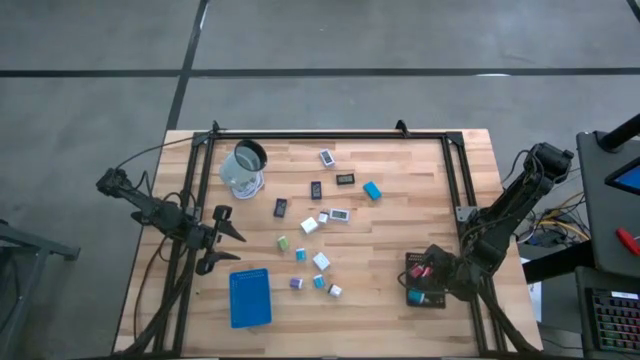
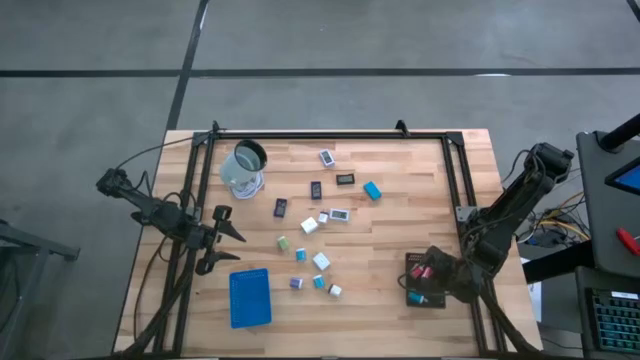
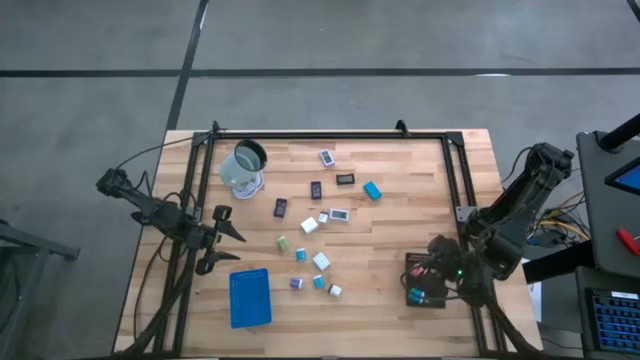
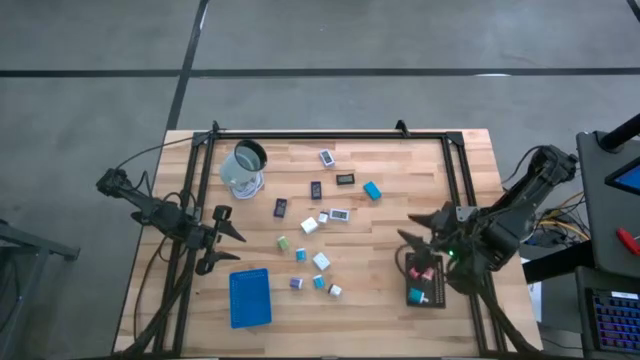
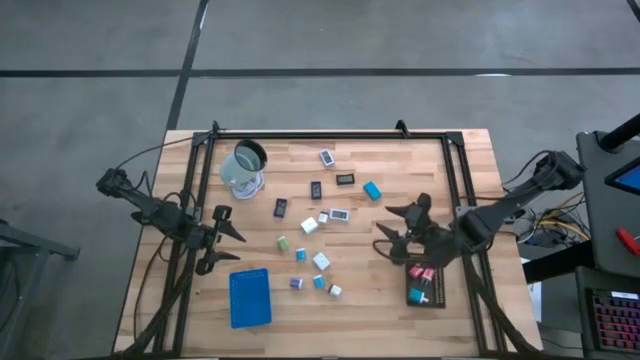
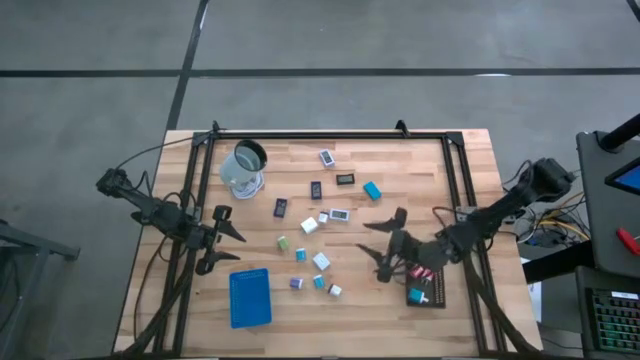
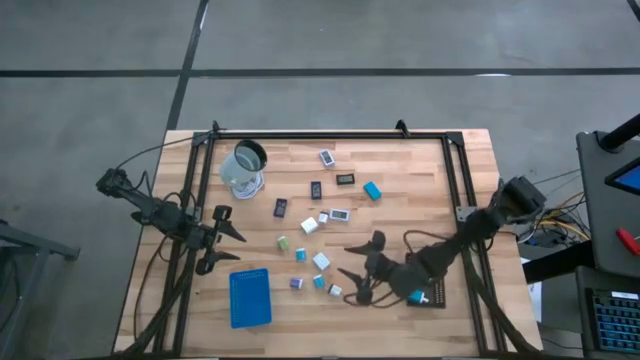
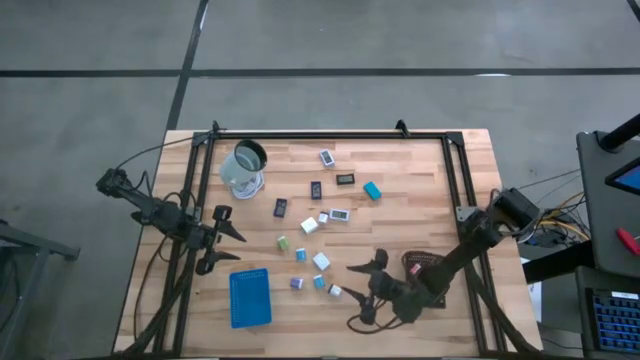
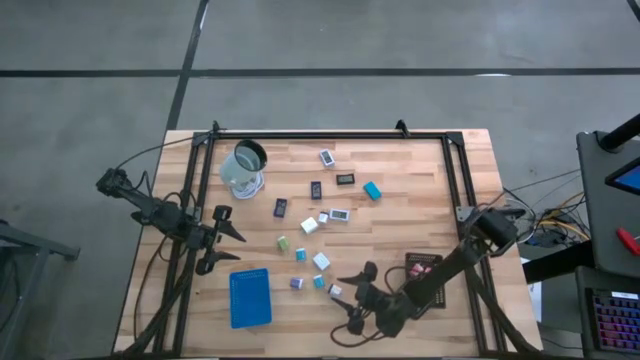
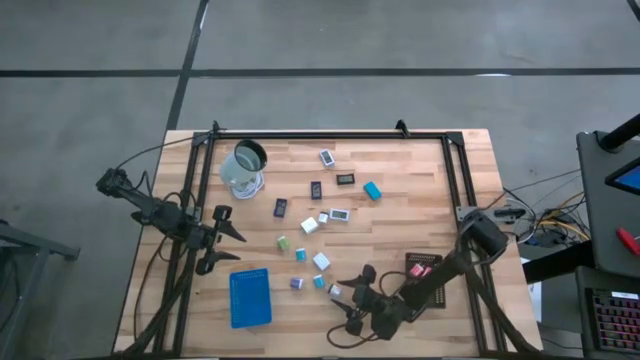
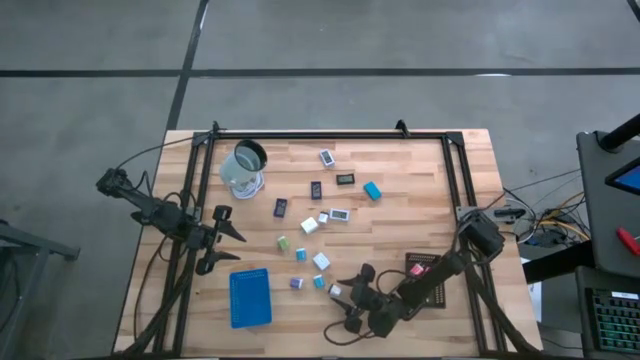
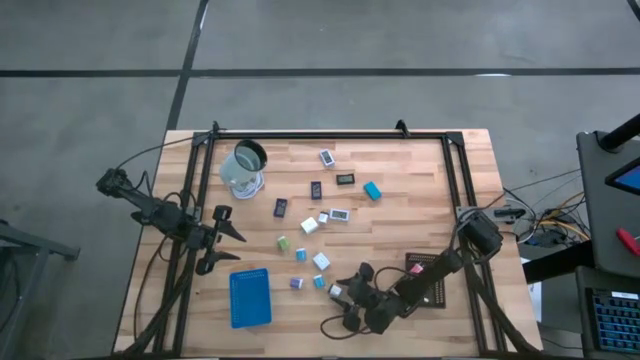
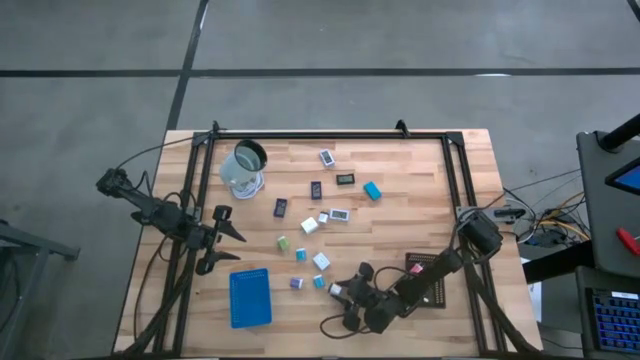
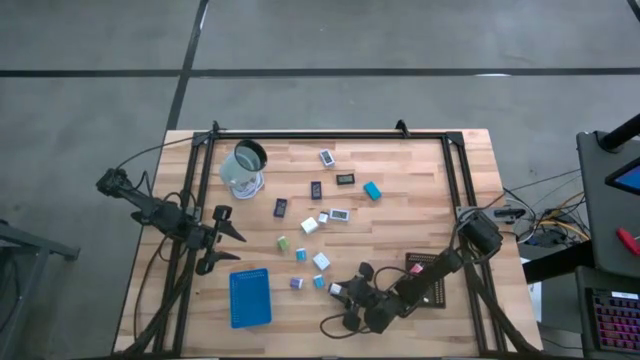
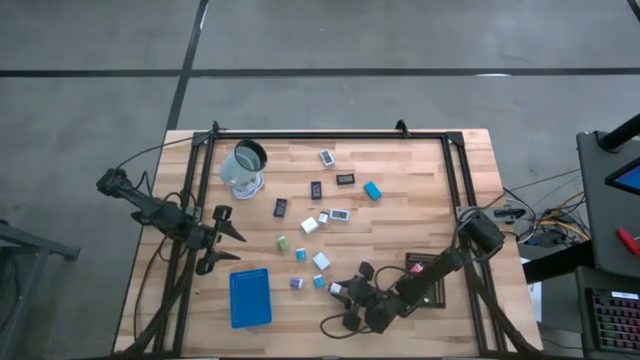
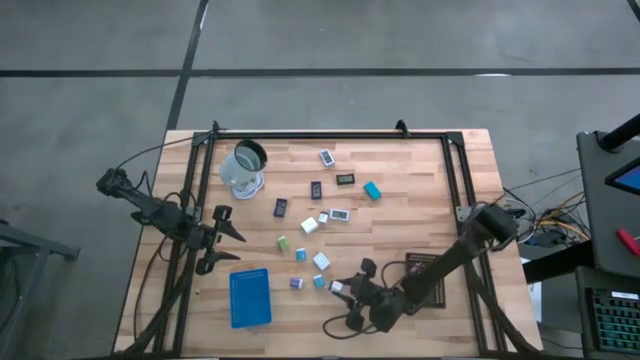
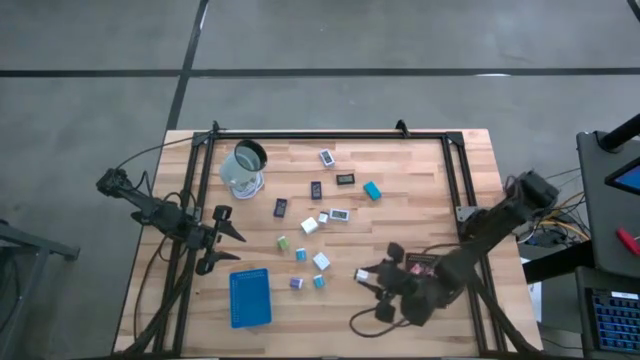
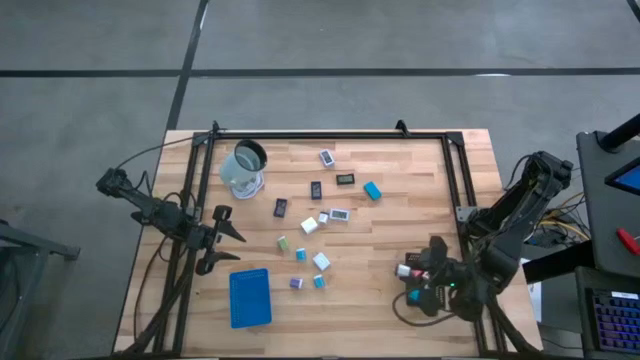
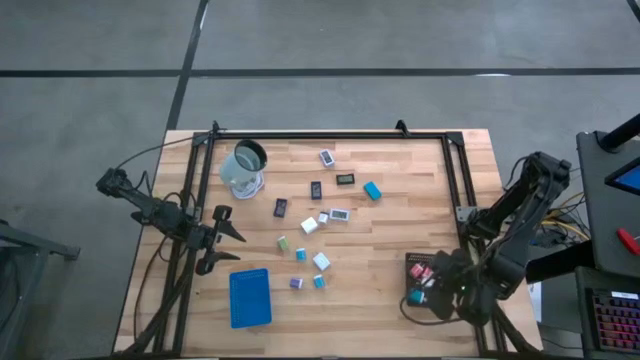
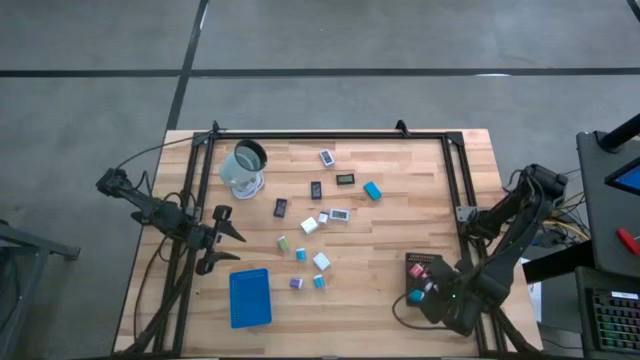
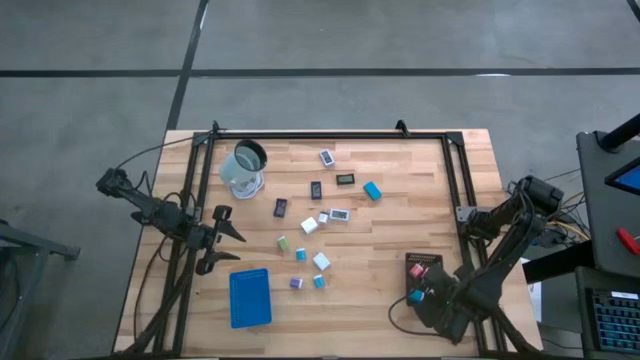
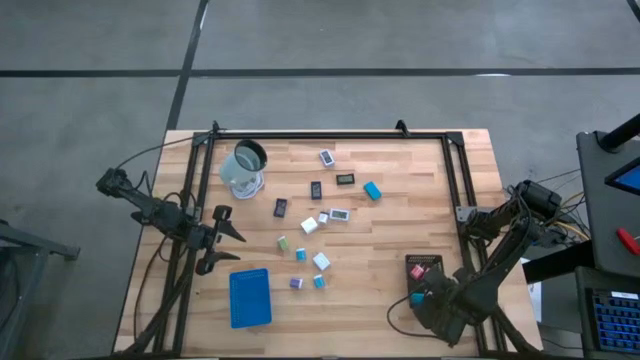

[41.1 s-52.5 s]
Task: Pick & Place Office items
Put the bottom white black charger adapter into the black bin

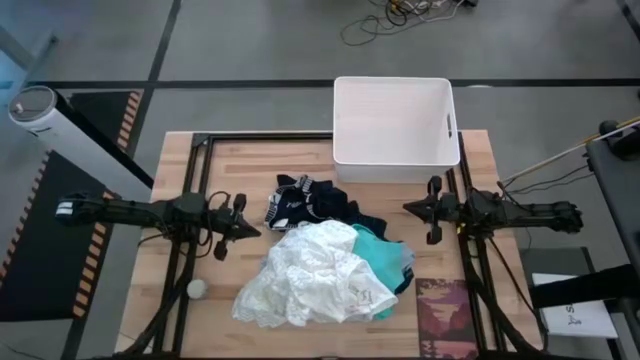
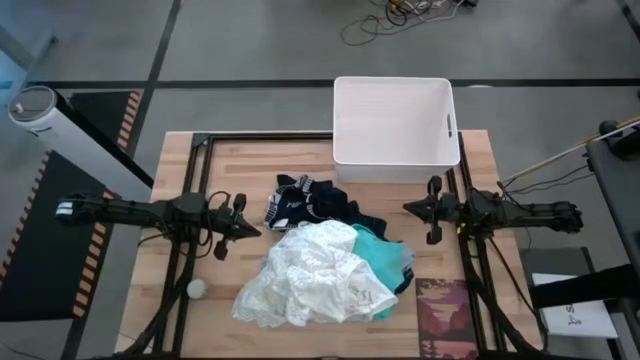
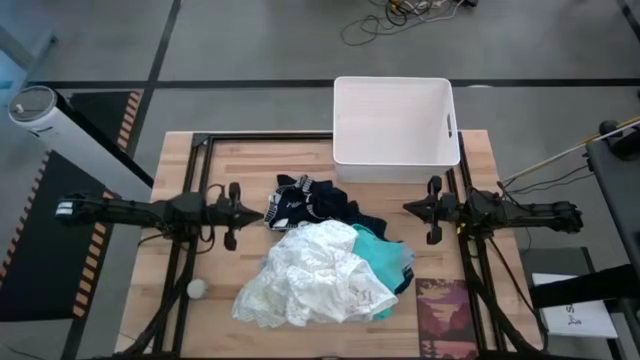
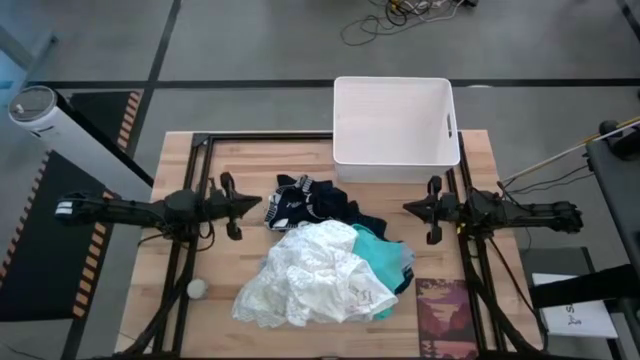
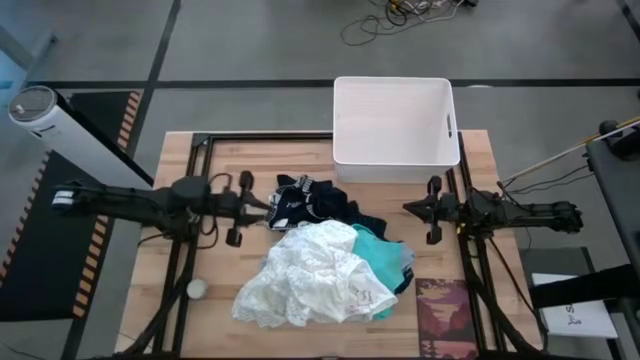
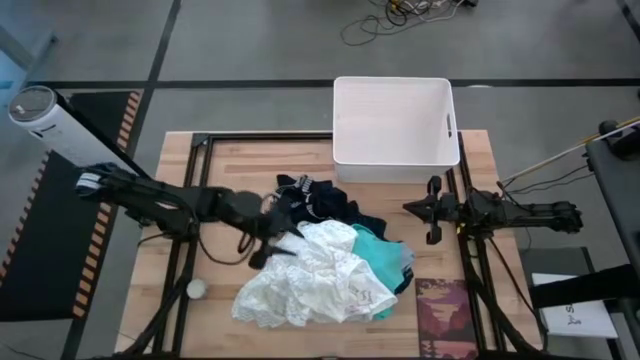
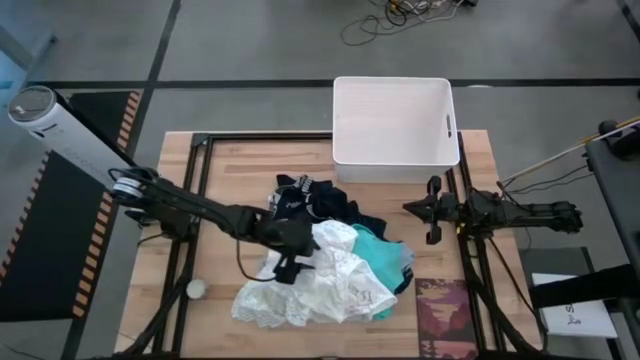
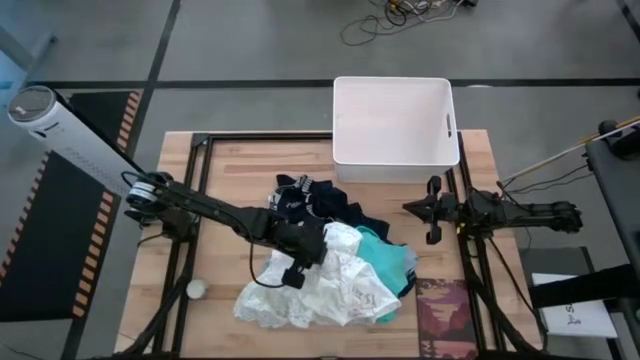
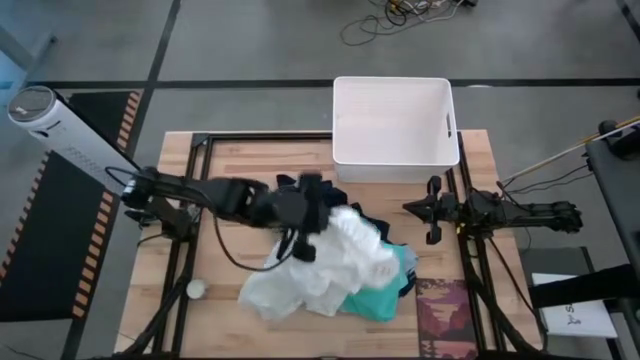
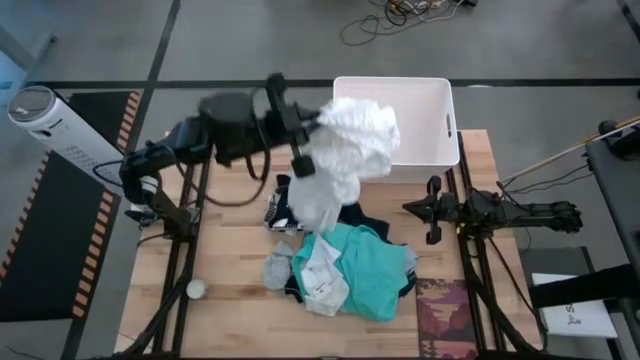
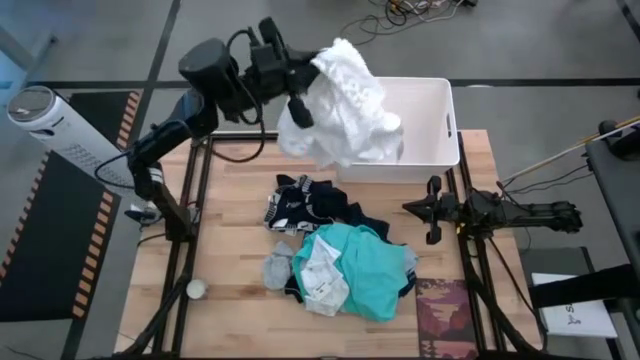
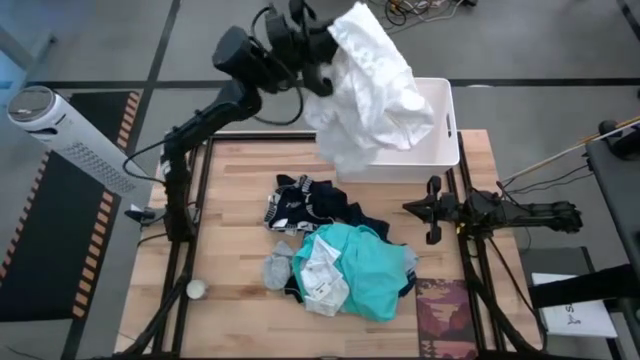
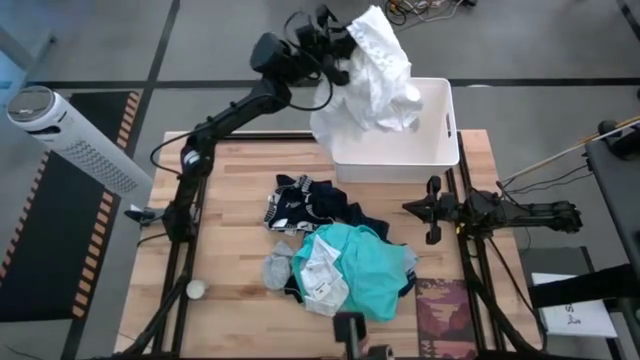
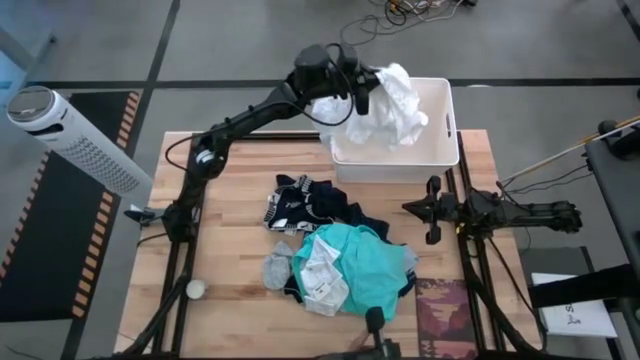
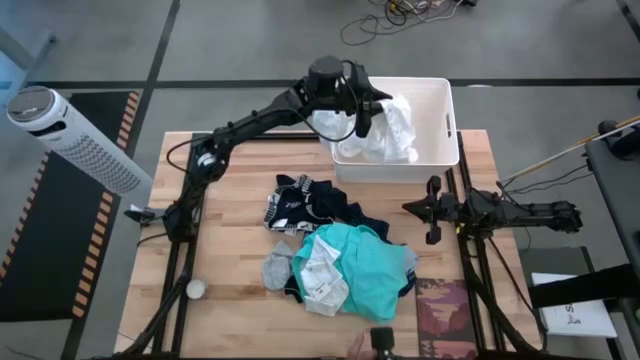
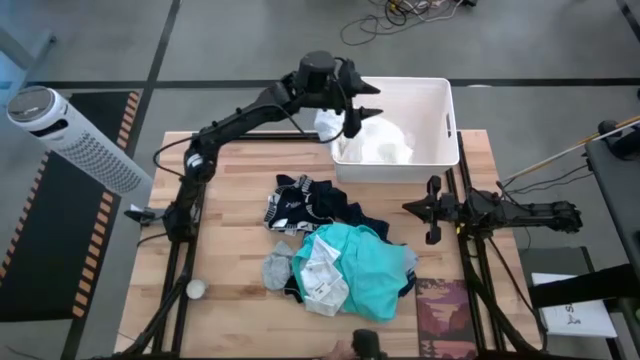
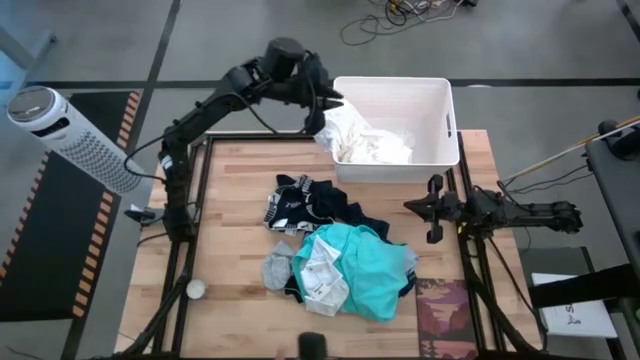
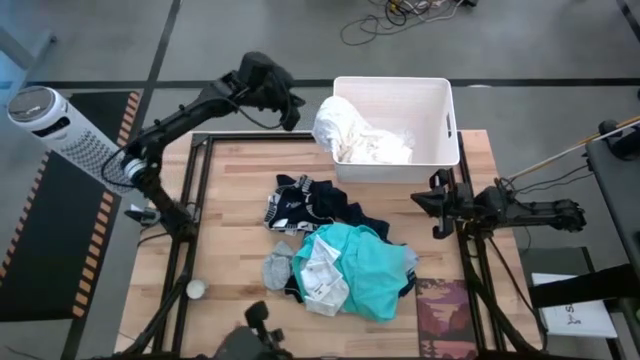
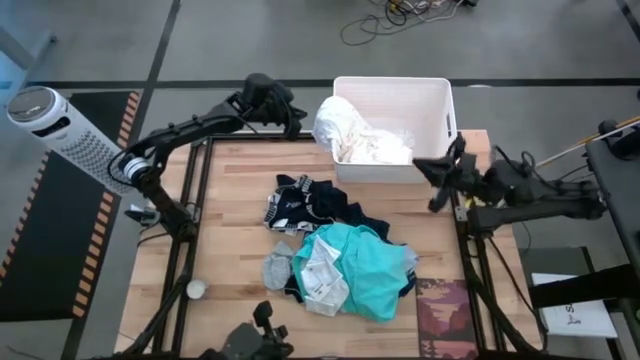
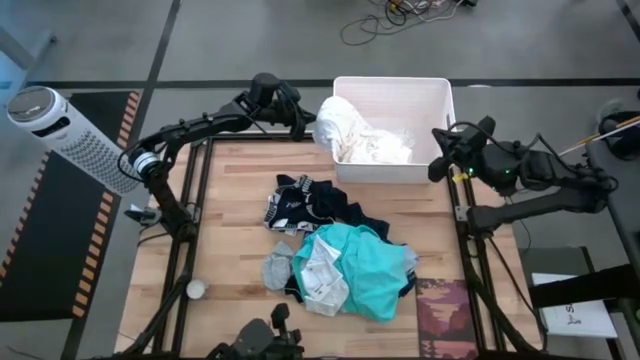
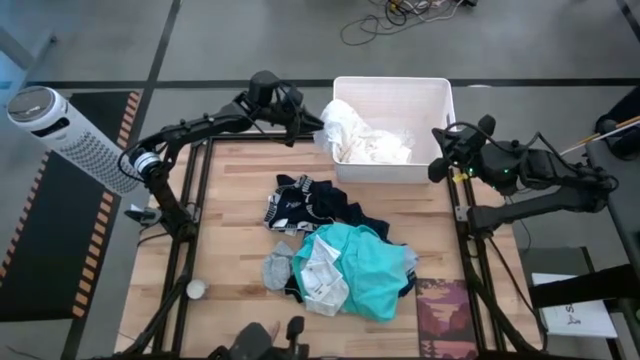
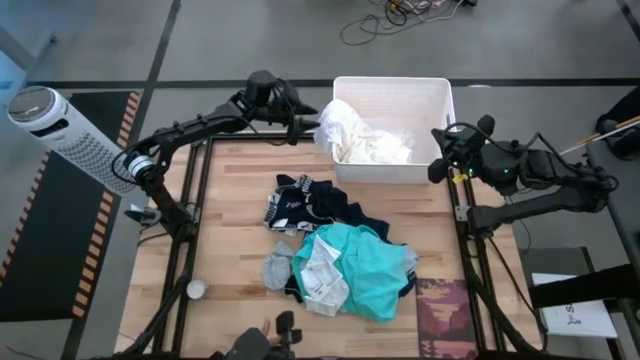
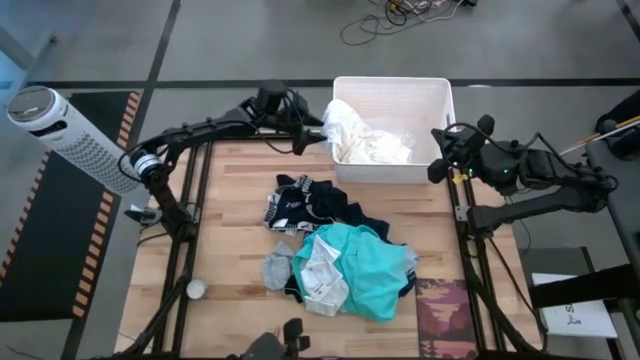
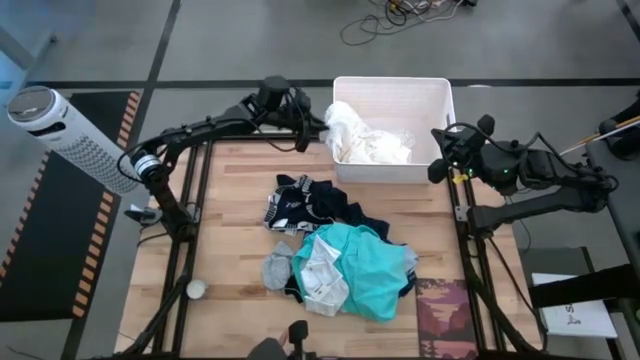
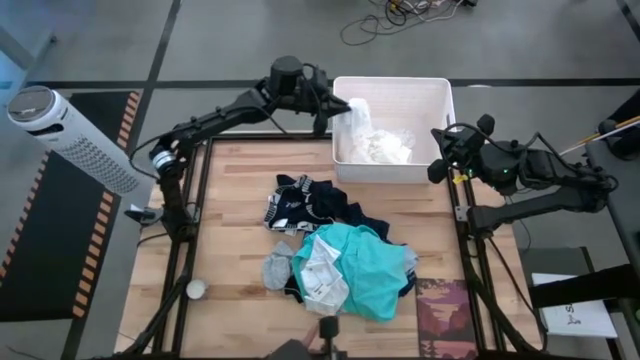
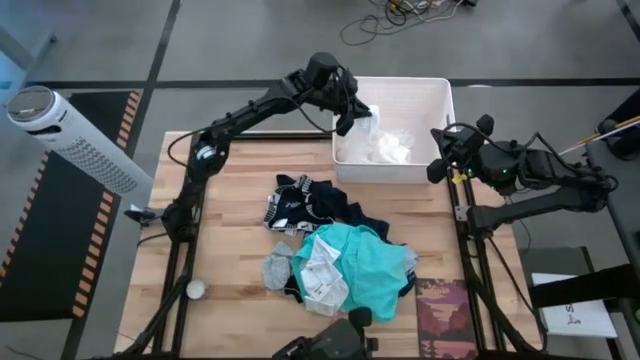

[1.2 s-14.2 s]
Task: Sort clothes
Put the white dress into the white laundry bin
